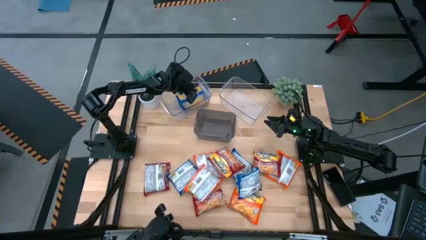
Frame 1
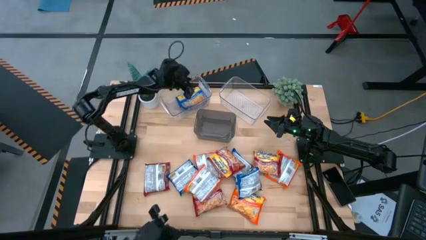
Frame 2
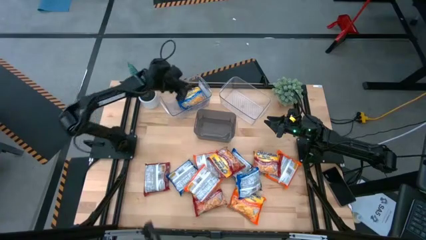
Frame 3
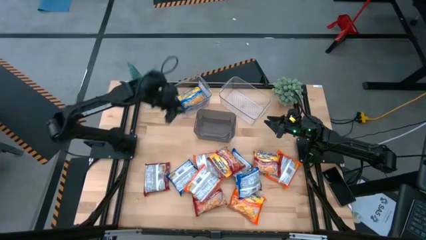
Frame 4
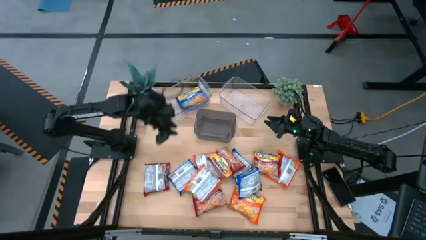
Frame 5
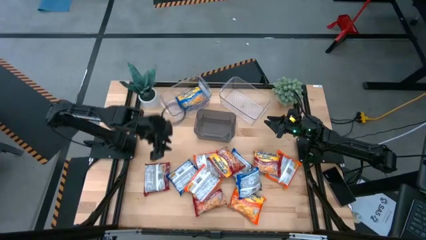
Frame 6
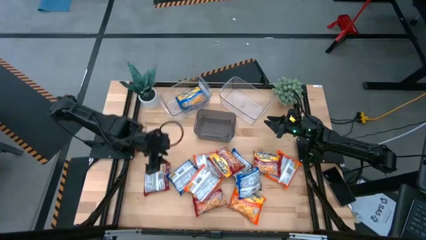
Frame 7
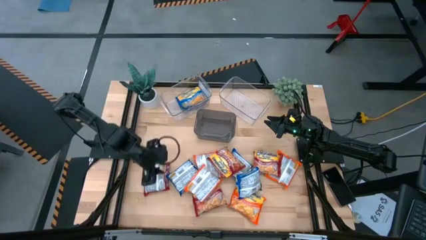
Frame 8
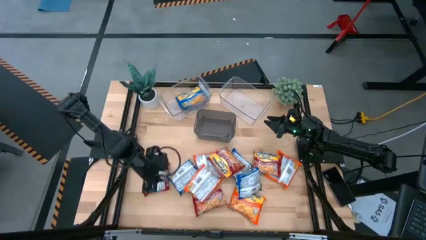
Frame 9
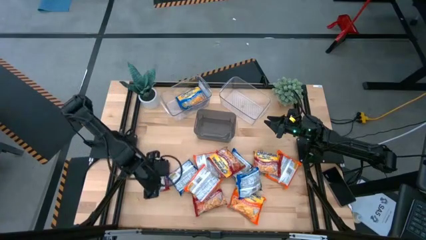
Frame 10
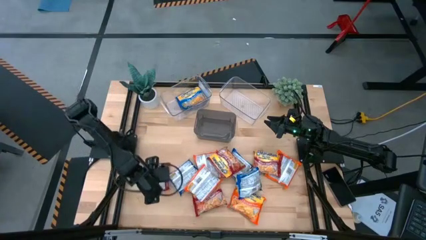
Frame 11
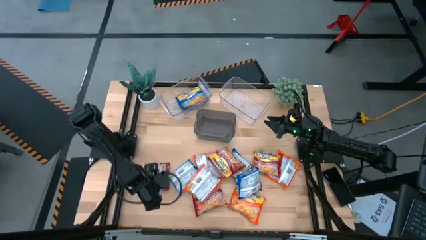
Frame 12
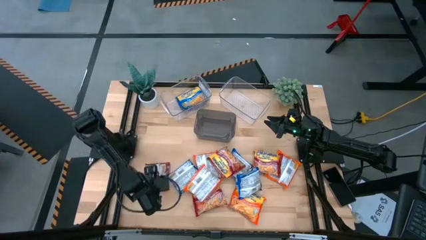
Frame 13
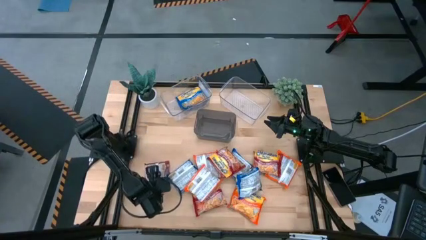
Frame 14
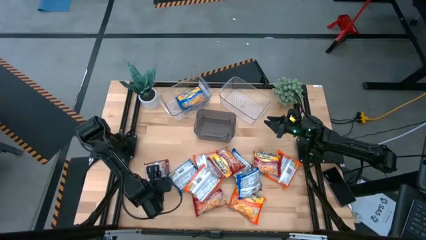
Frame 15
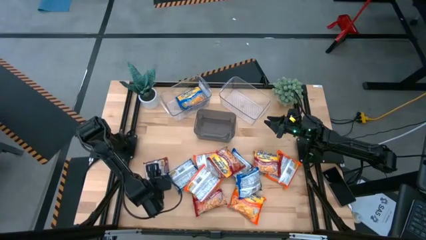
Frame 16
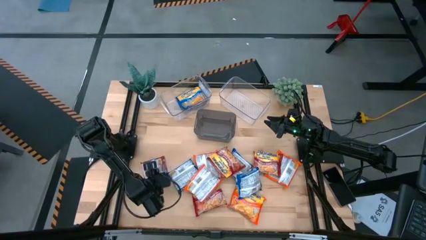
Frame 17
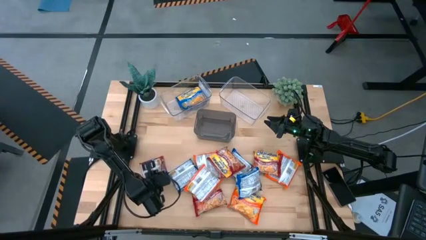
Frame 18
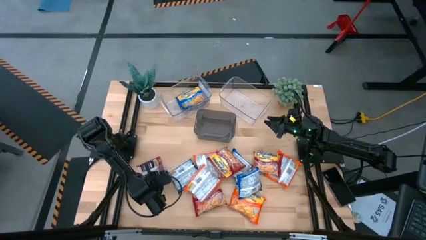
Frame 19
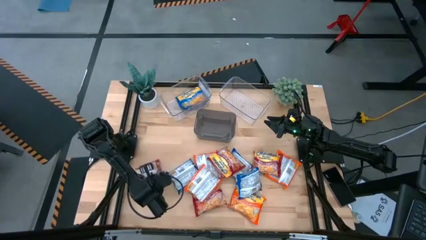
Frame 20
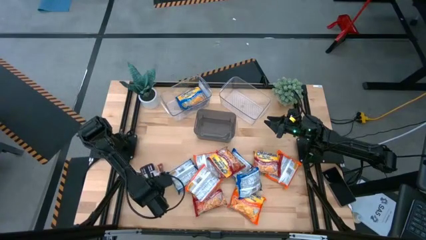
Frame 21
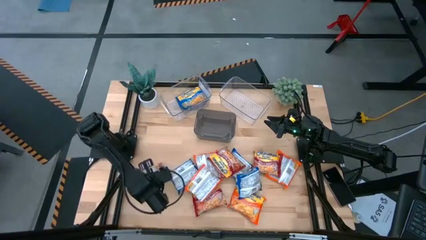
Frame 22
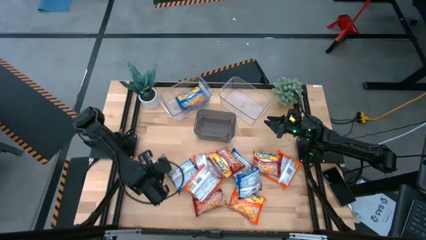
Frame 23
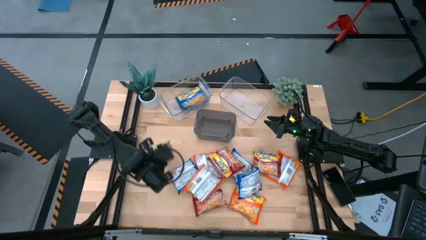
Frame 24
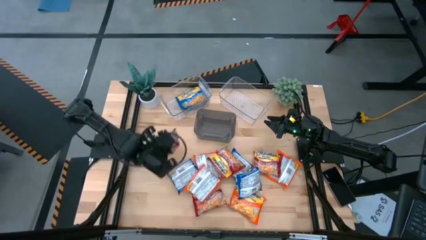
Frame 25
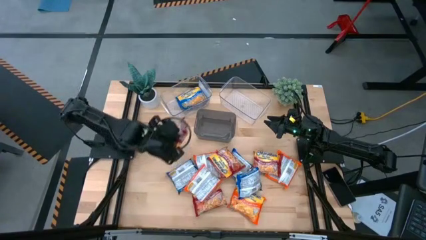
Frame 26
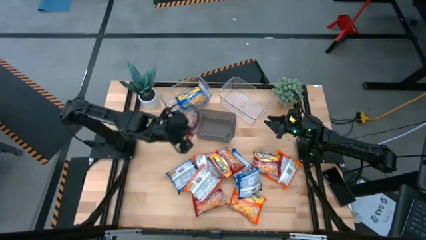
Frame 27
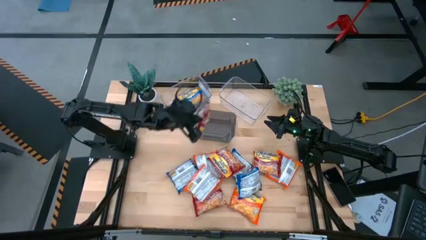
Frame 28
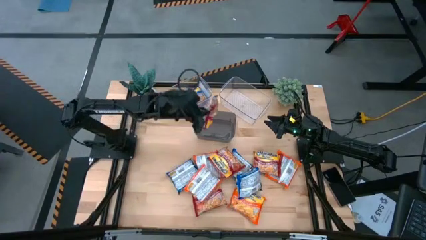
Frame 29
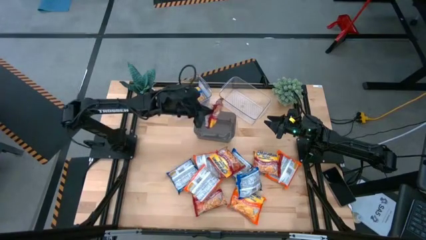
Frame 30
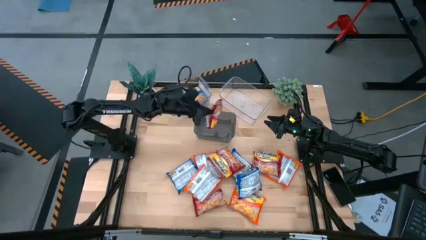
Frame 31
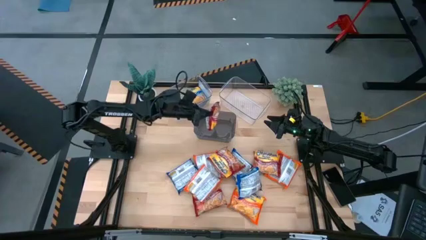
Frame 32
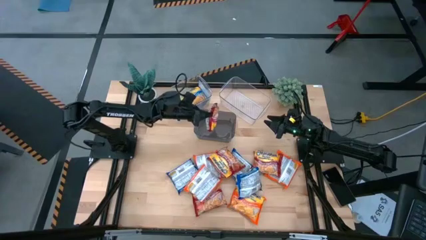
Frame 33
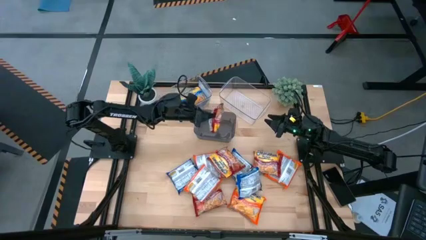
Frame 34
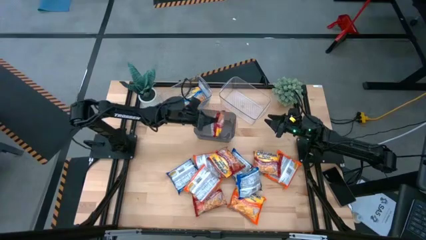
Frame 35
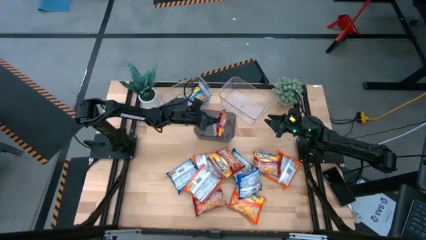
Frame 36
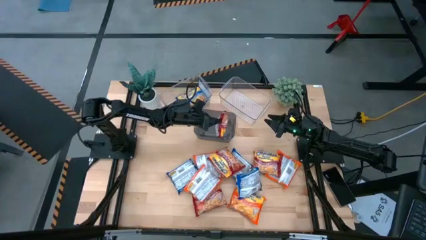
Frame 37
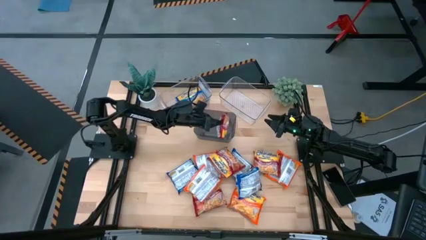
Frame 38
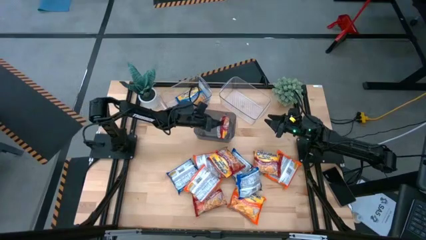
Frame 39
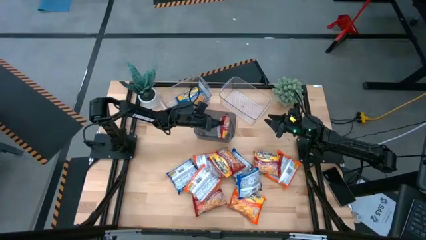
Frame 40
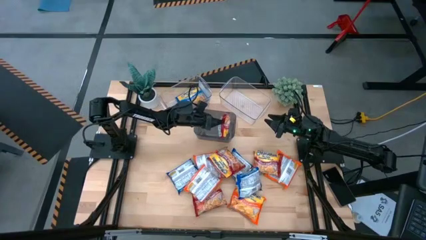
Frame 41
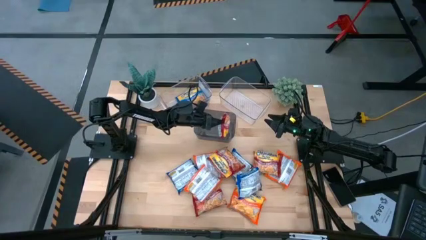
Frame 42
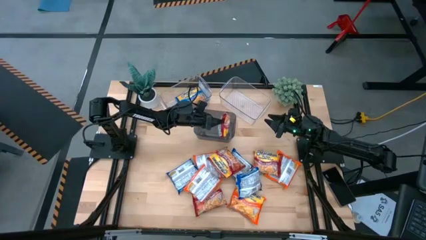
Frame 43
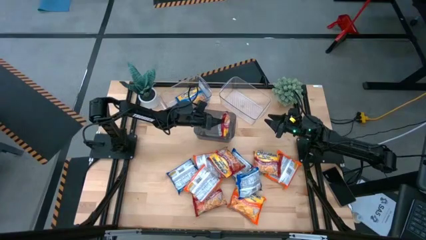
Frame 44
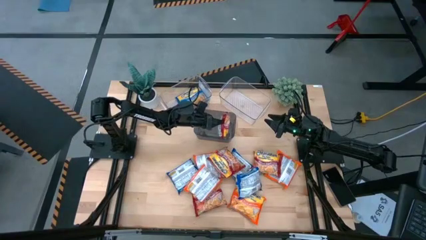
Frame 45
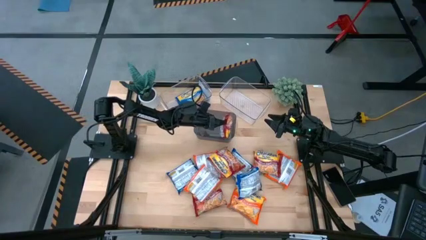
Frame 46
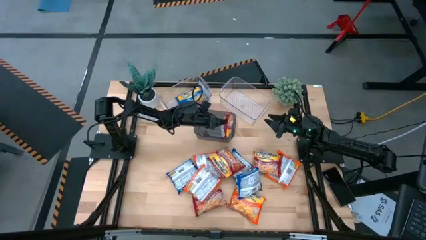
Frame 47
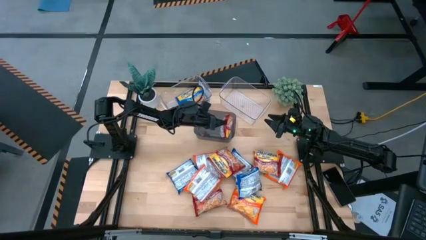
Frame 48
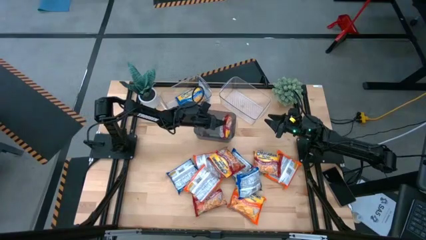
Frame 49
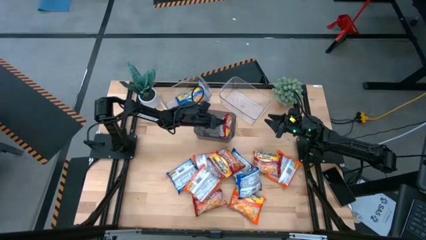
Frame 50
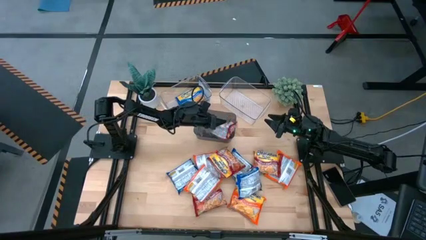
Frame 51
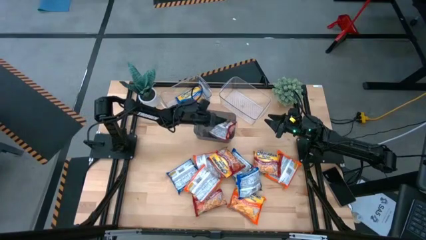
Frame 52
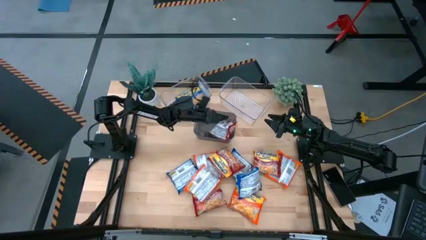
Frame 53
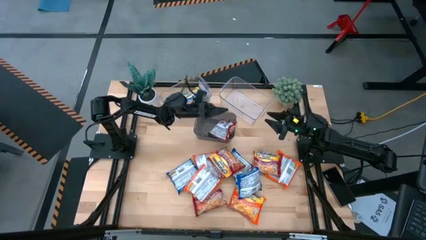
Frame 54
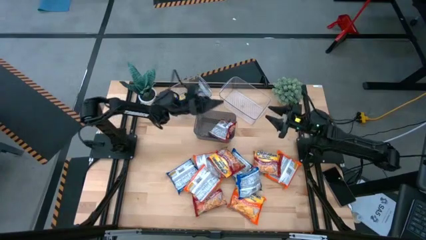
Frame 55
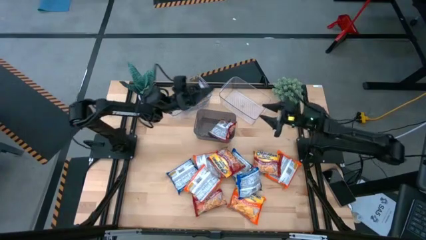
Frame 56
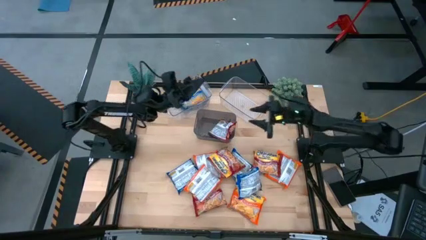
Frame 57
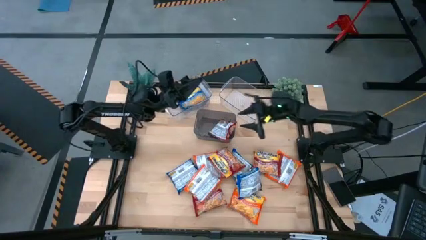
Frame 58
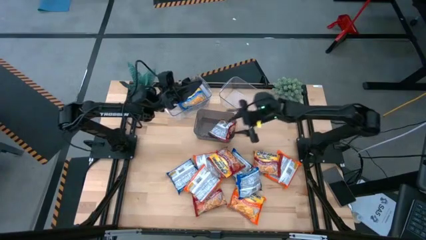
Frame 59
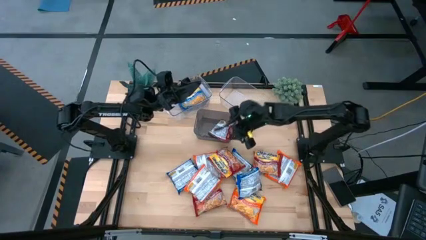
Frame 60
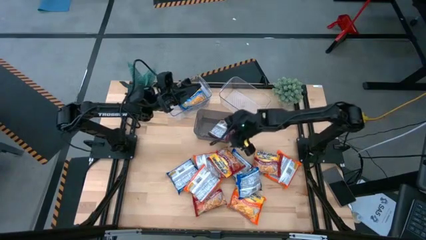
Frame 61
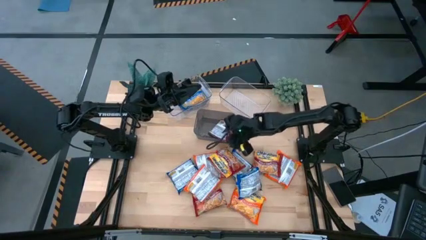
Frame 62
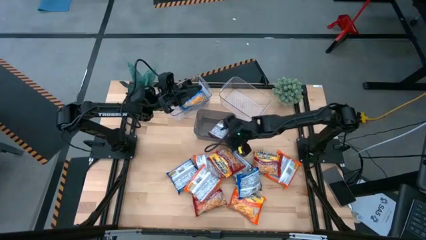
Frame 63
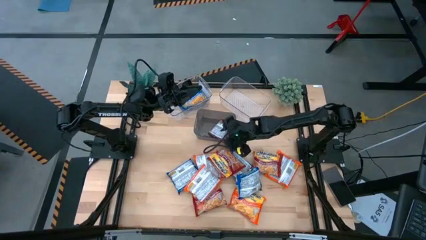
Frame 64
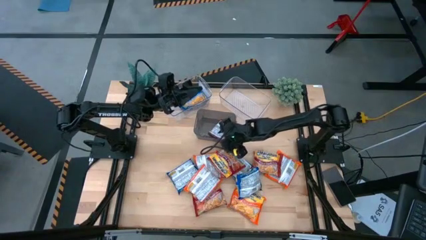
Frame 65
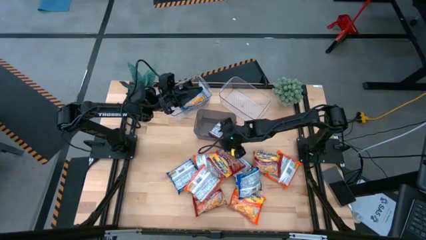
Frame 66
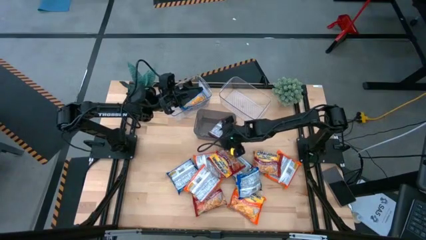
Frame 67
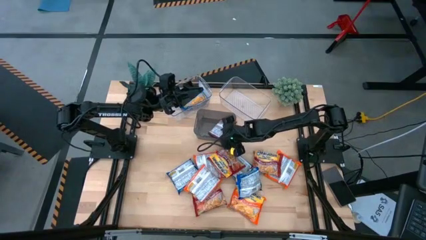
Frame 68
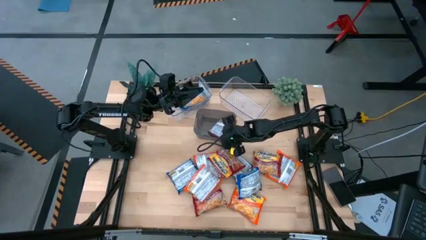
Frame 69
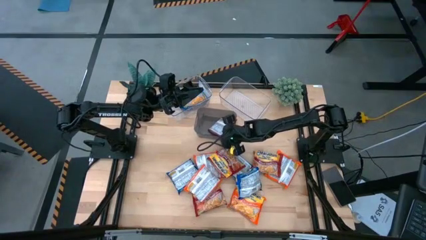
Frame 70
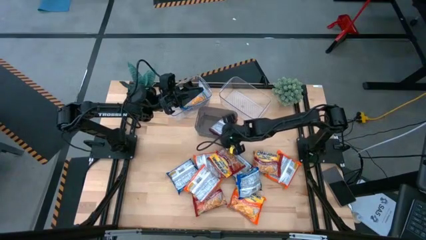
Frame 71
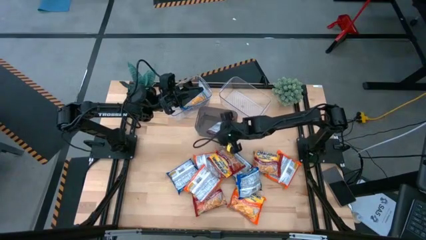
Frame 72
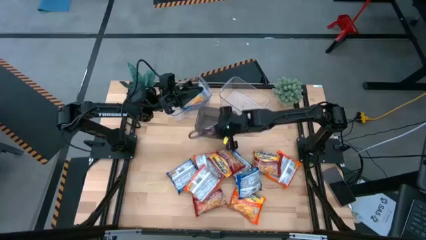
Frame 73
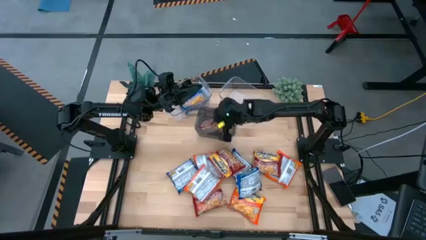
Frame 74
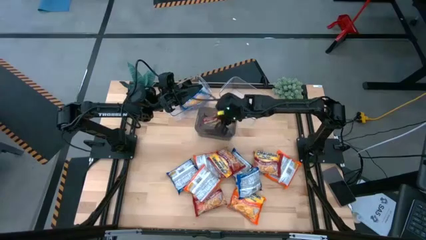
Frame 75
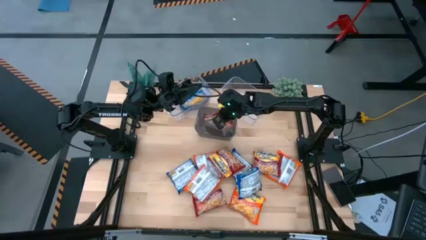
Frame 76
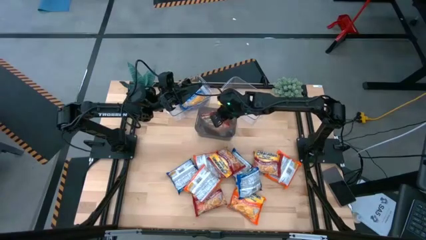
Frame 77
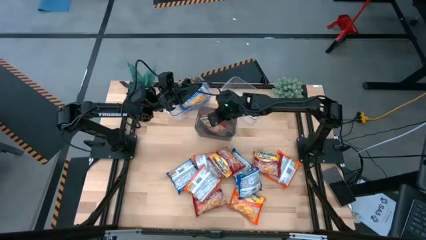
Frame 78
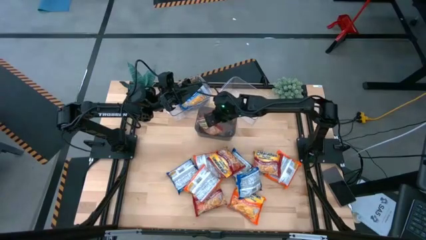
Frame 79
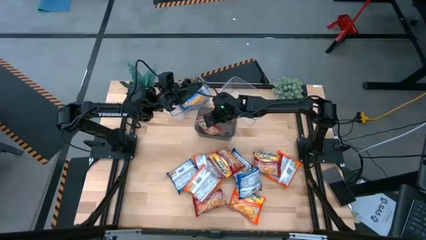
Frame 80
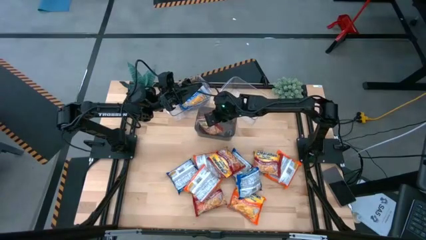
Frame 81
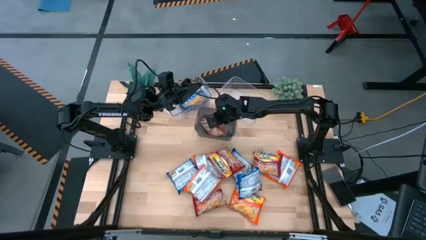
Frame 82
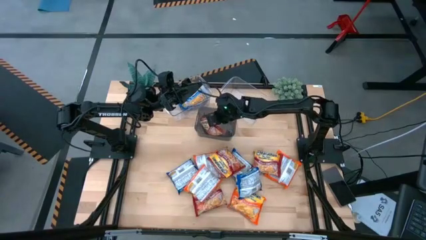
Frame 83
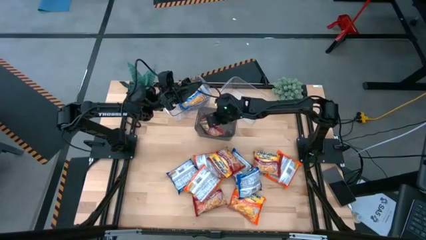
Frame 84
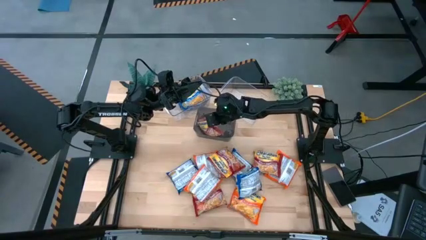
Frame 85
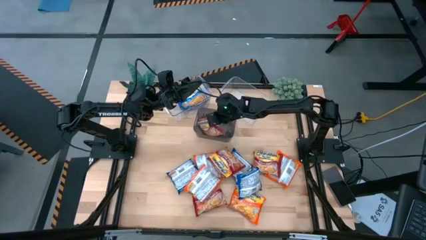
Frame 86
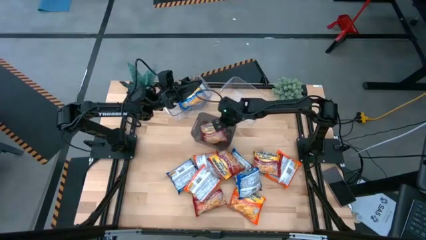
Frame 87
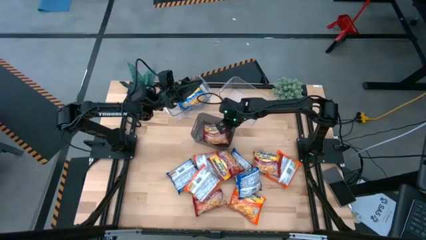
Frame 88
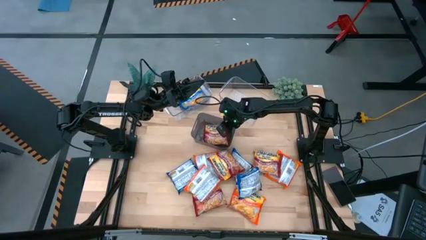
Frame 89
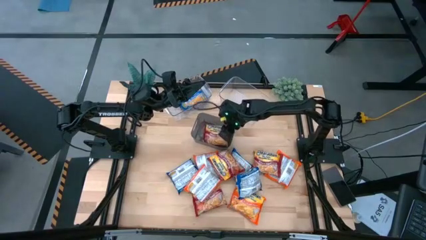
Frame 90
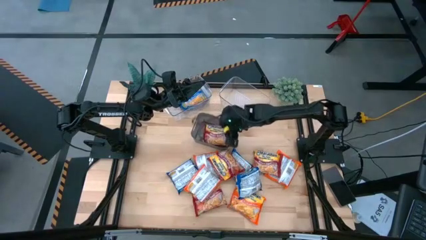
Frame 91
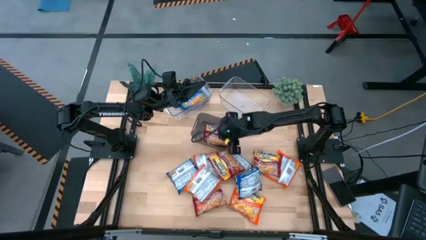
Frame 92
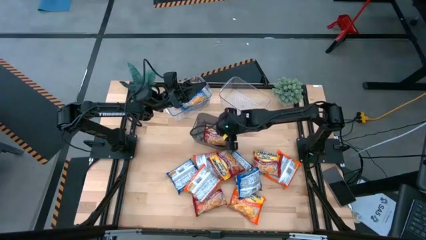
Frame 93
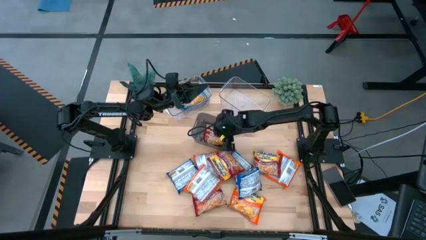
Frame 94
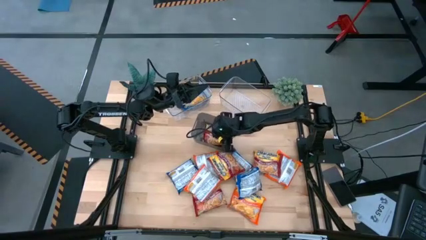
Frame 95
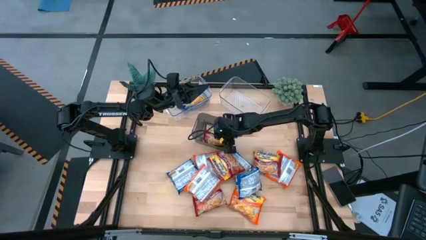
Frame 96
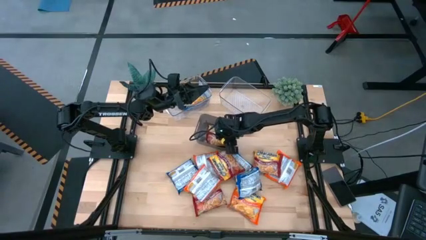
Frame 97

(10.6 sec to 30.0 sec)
Task: Sort Maruchan noodles
Put the red noodle pack into the gray bin
